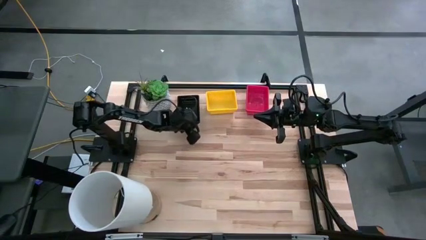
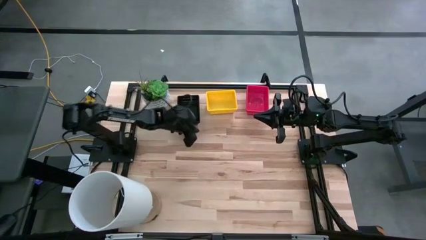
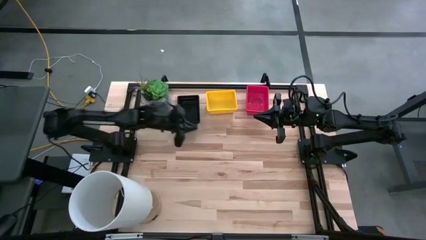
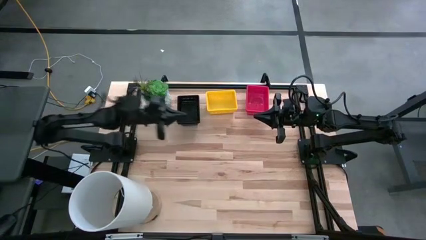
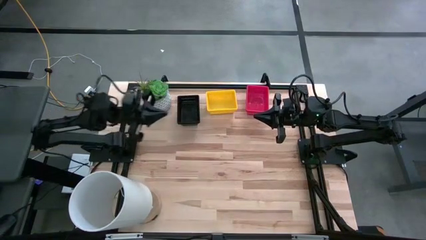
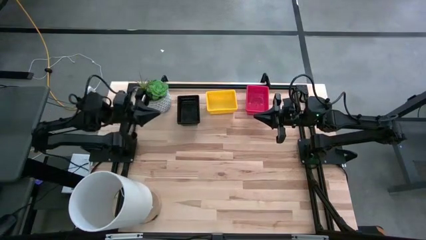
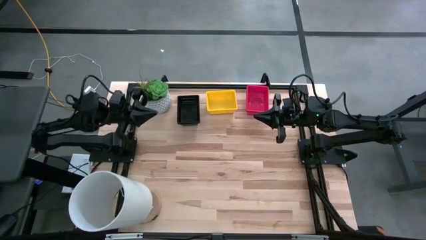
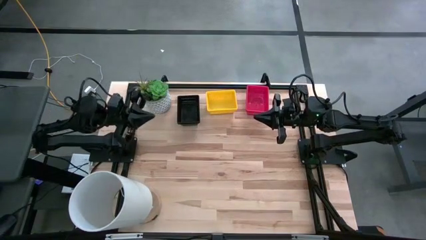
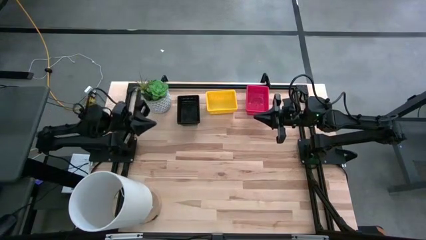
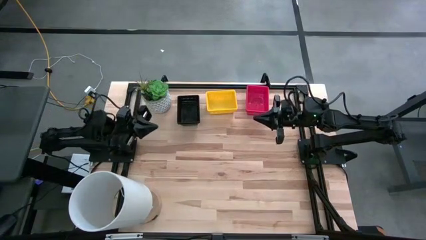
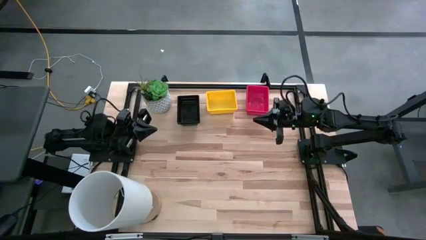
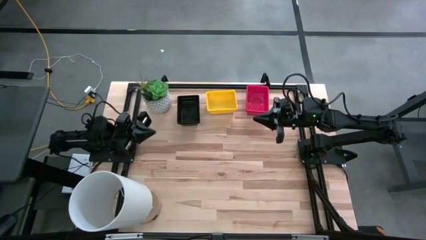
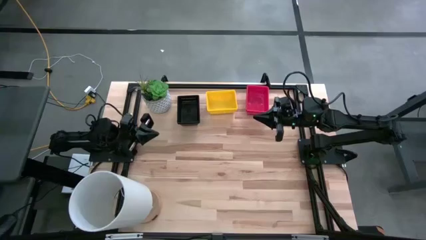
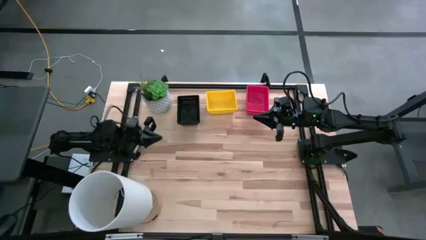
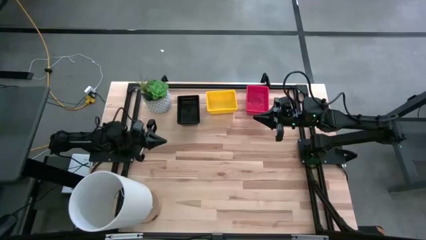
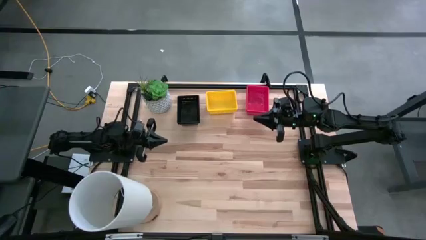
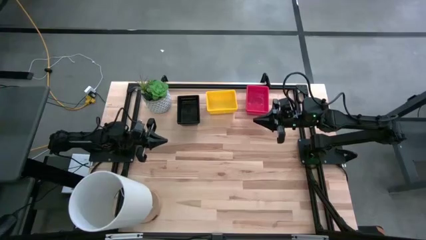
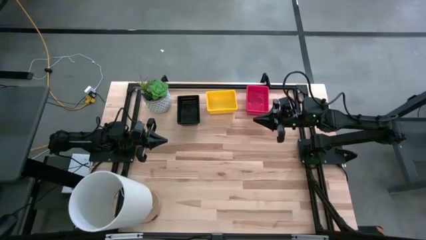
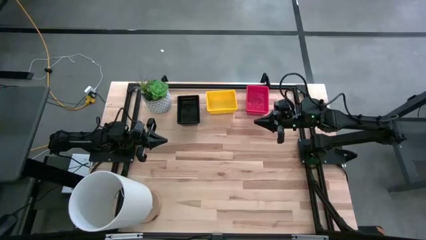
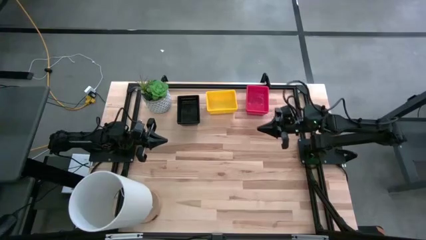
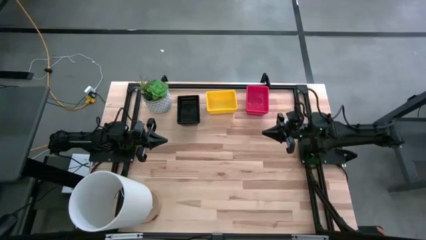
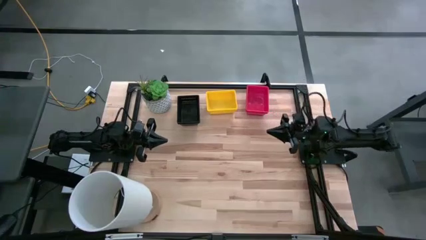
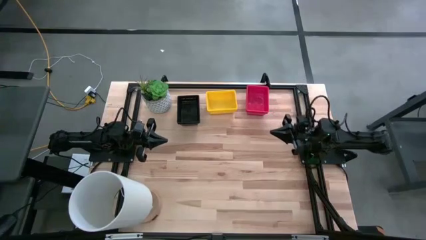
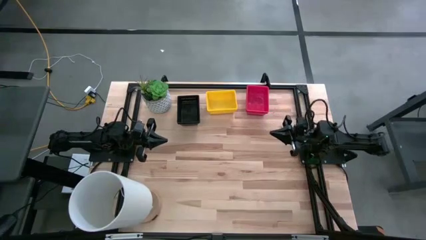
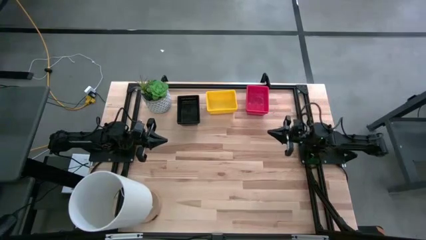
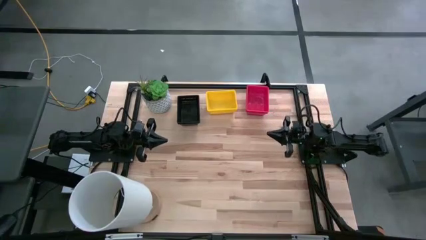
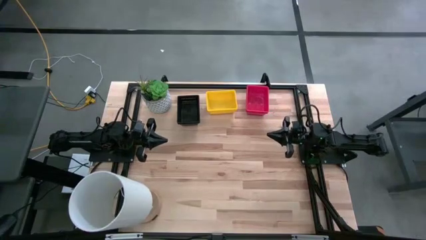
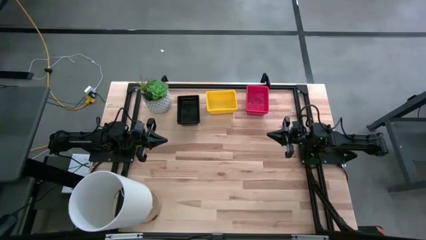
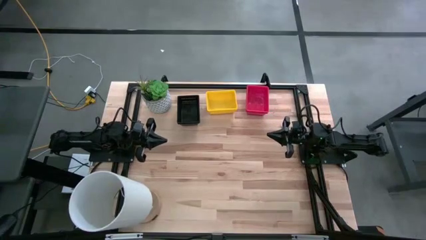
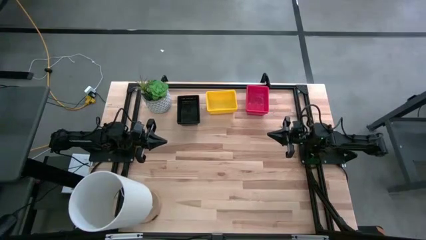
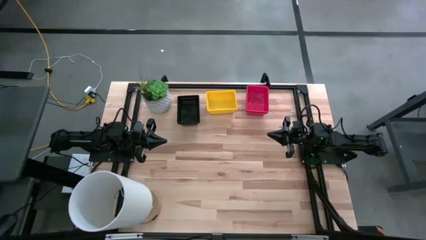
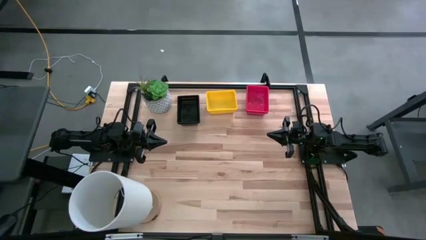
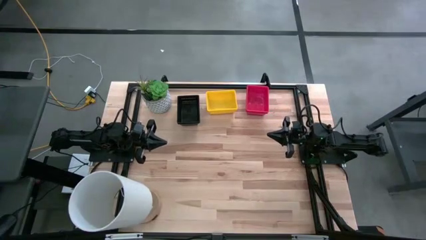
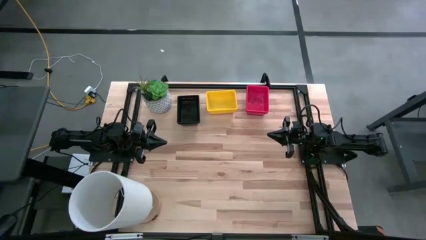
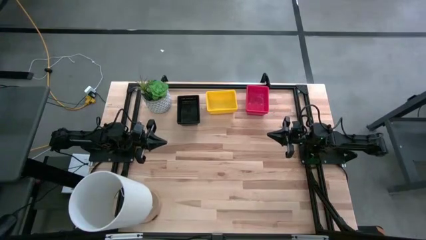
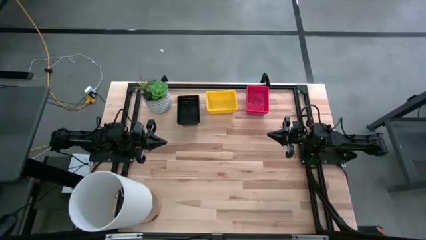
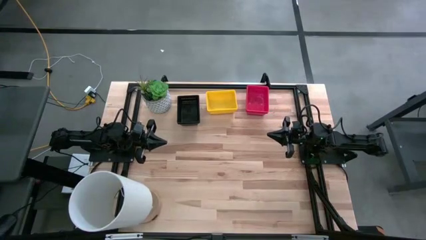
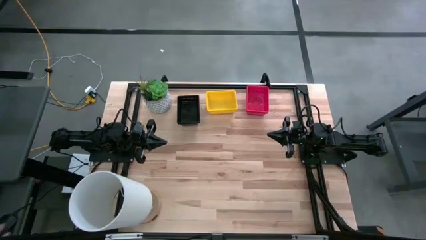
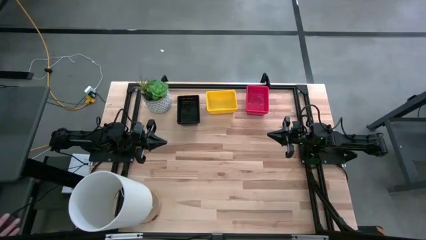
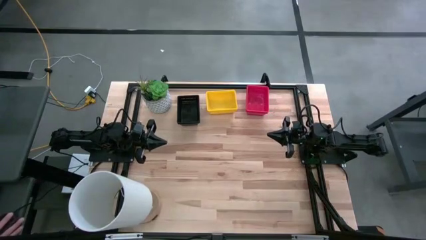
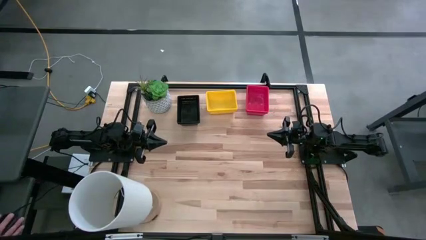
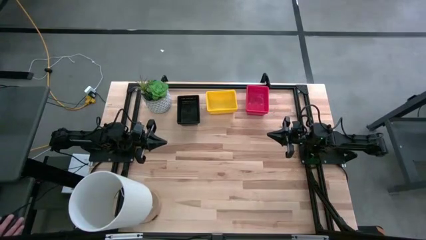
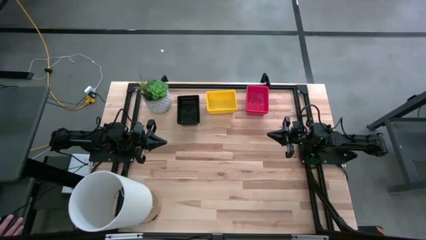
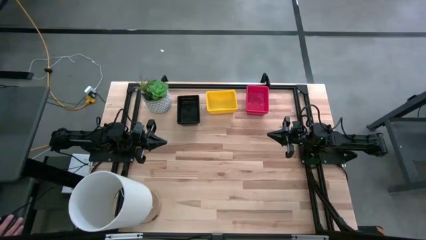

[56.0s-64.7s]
Return to Home Position

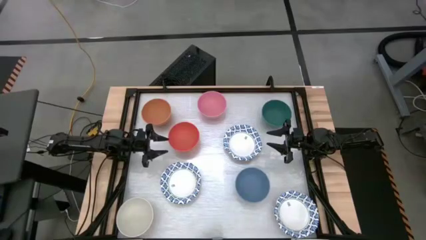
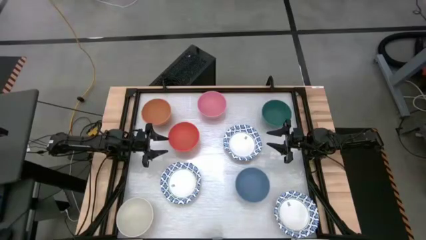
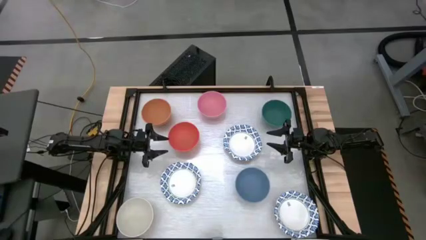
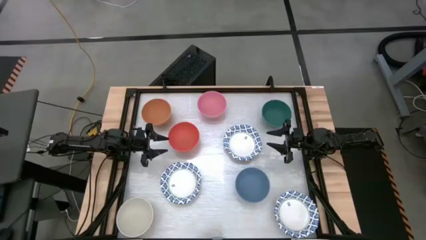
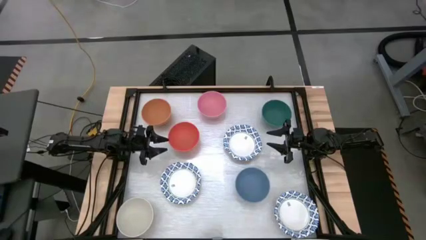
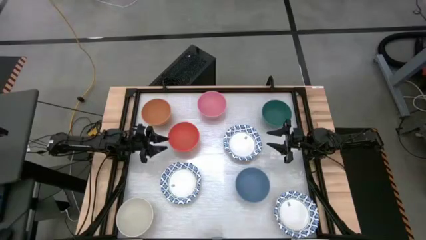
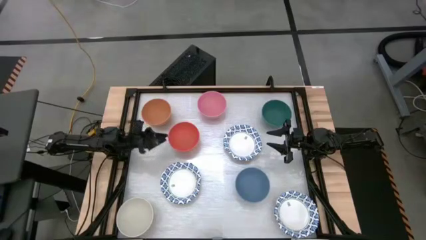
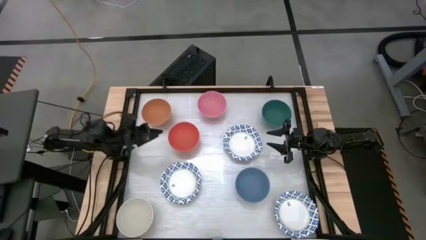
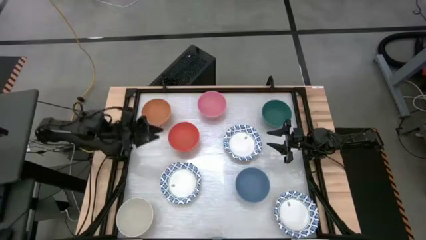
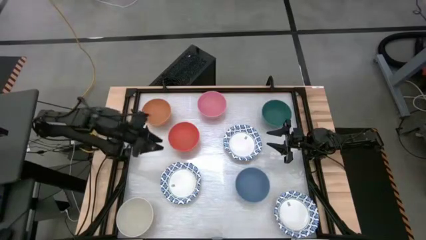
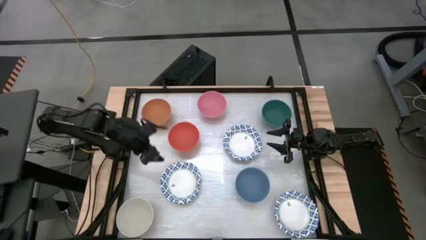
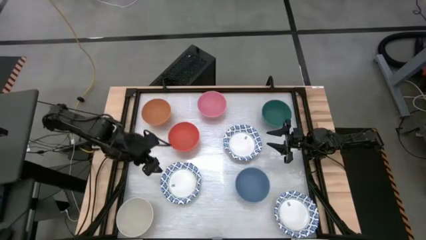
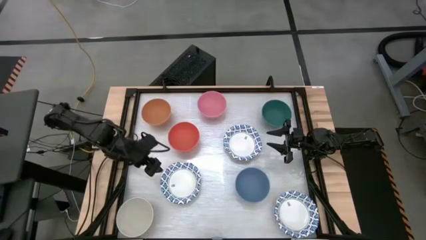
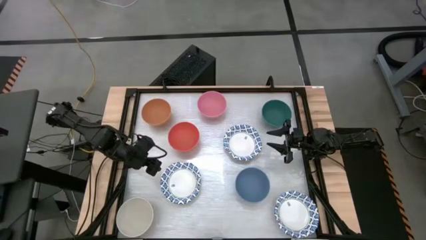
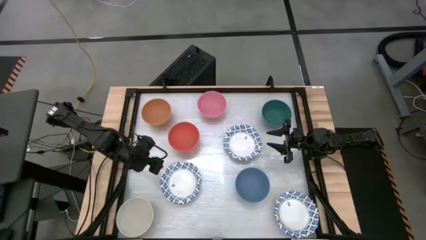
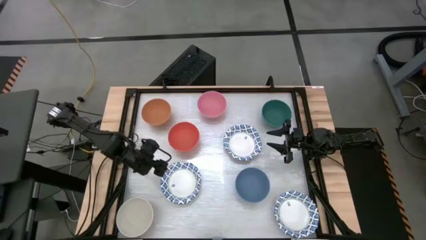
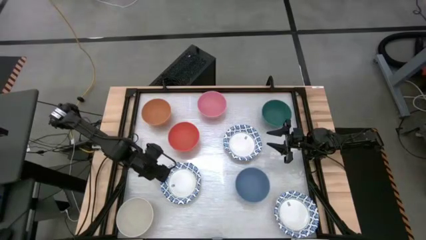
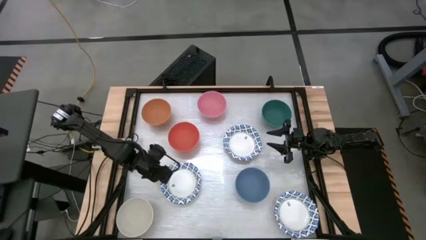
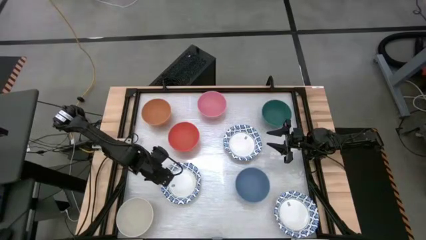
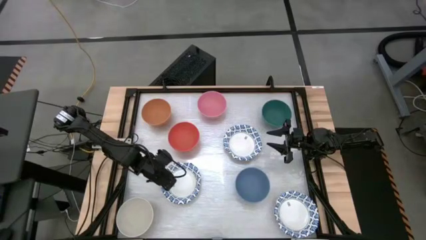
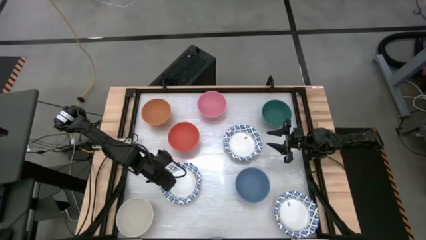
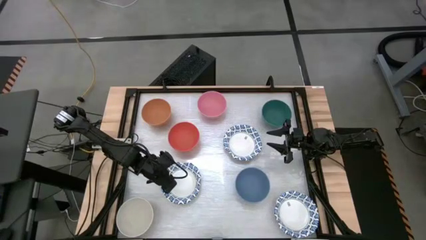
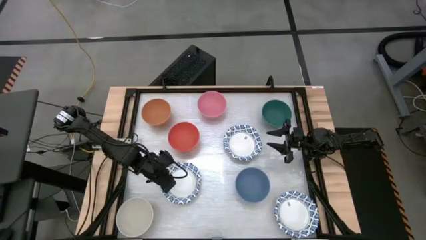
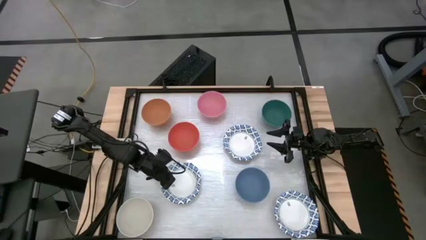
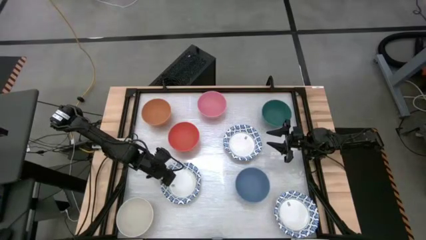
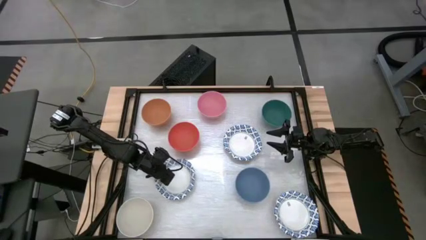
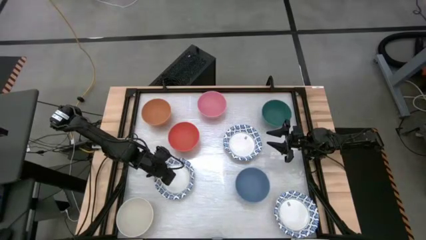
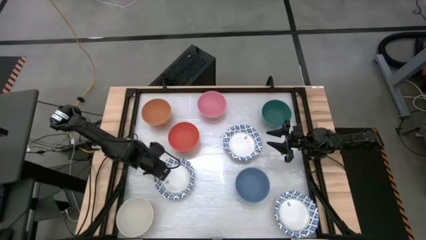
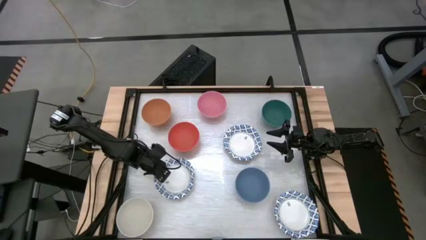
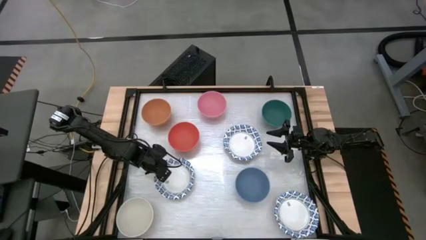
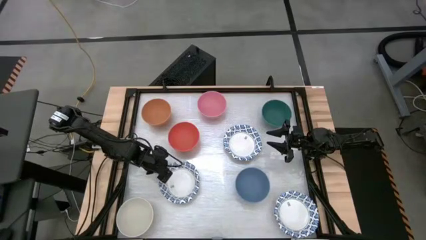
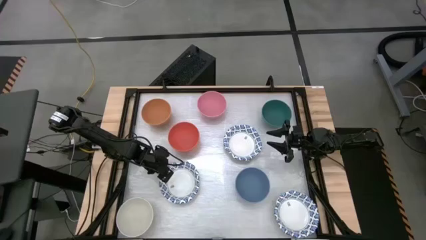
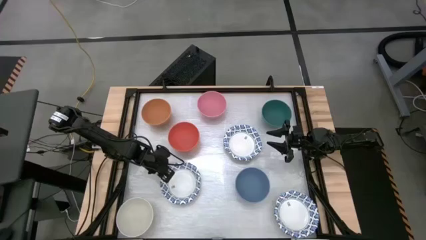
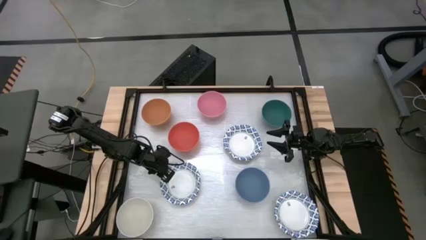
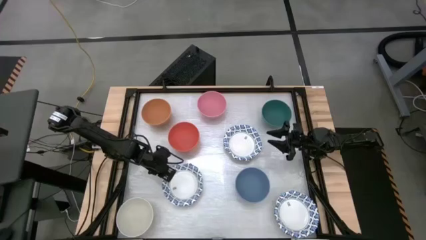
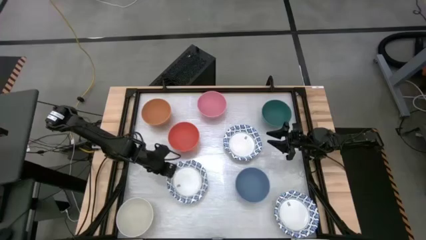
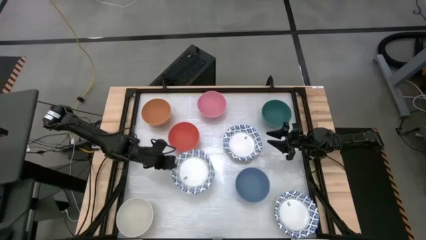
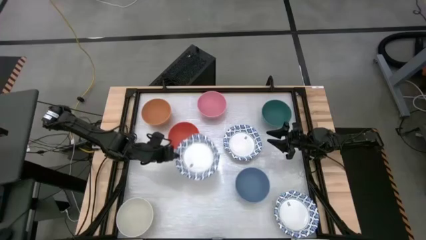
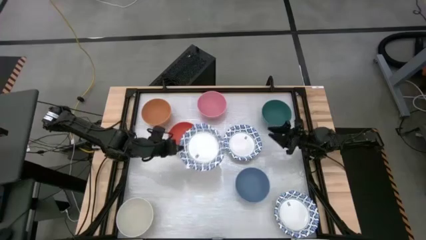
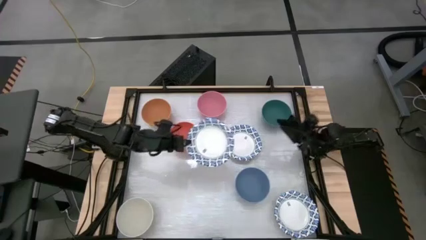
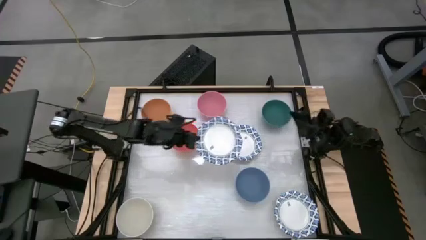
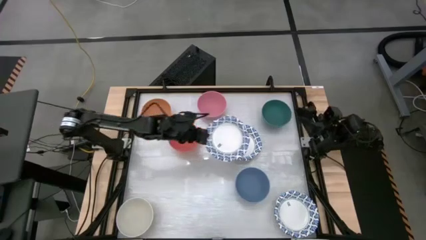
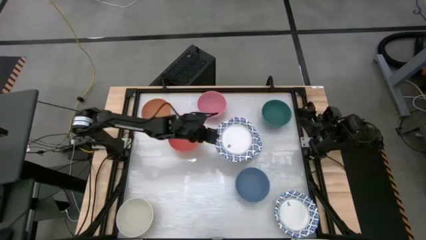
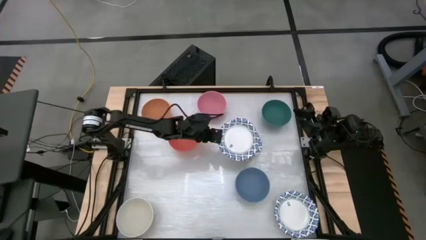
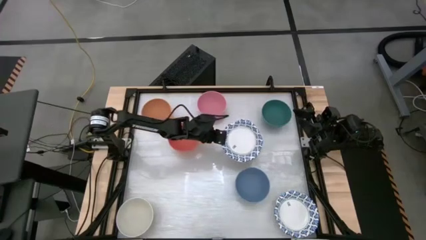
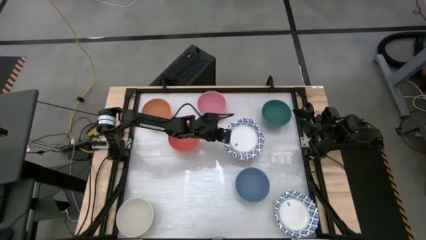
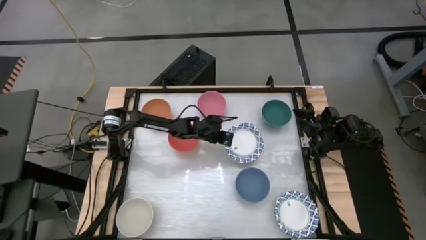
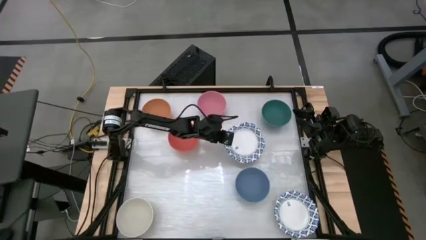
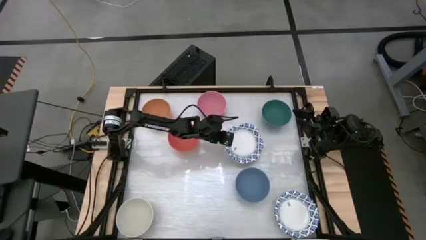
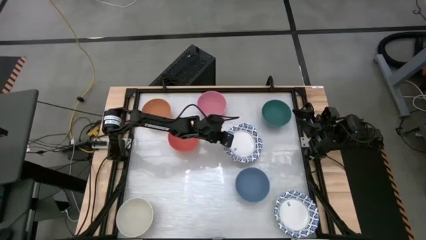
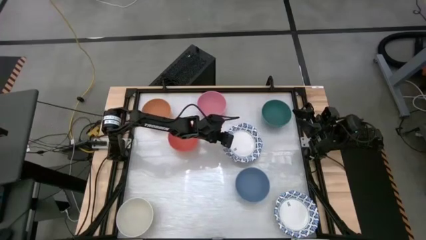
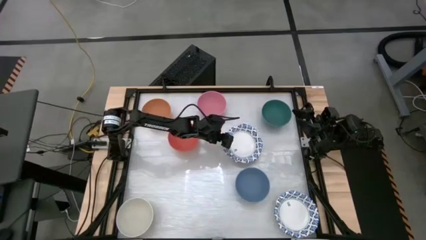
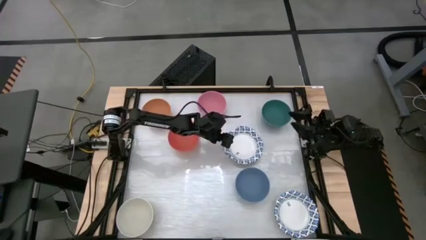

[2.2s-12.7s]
Stack the middle white patterned bowl on top of the top white patterned bowl
